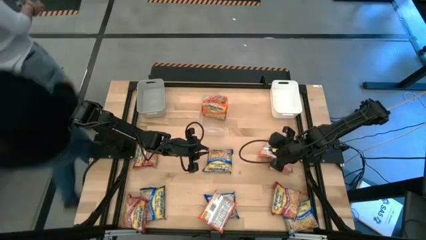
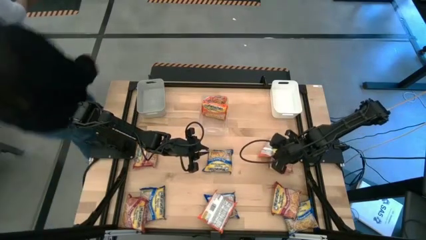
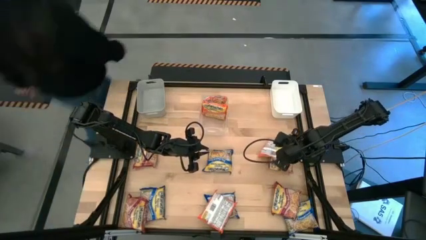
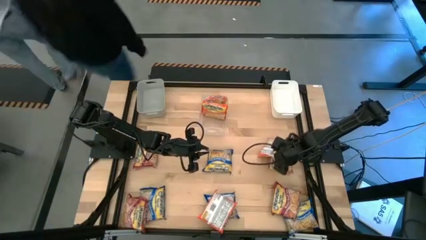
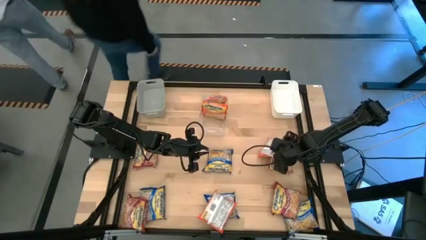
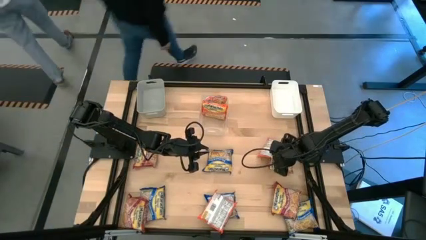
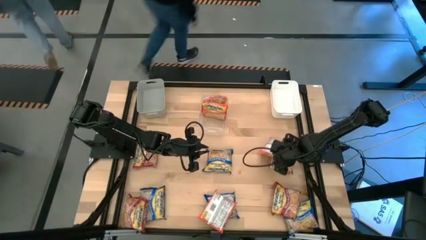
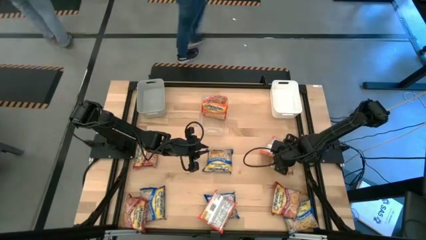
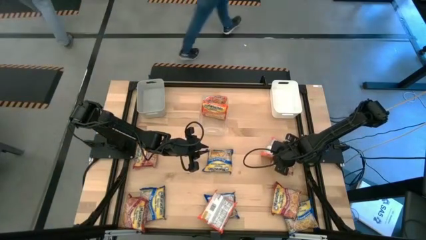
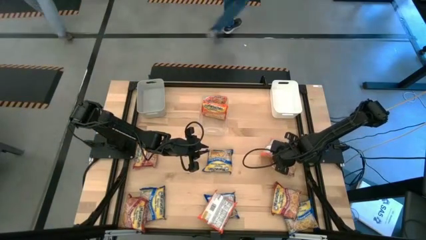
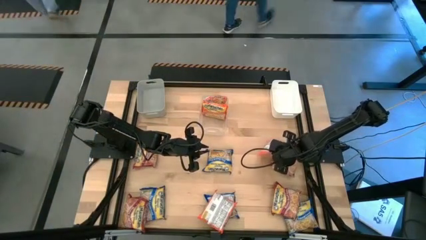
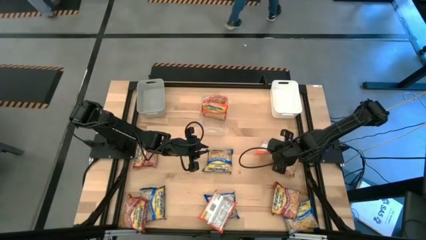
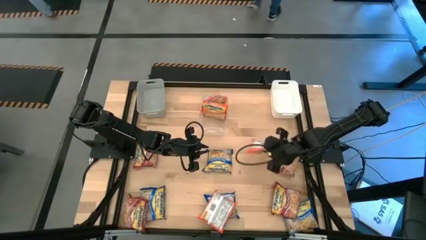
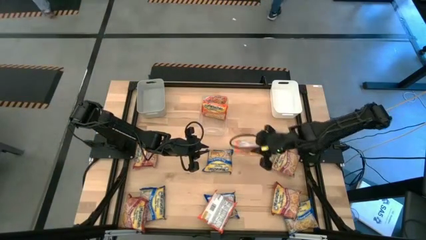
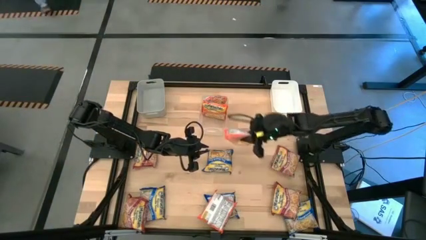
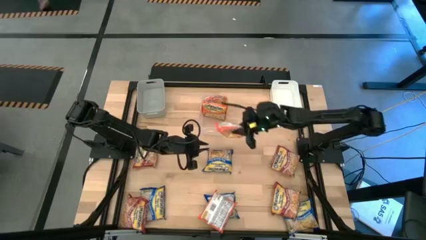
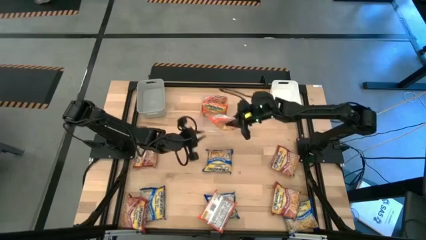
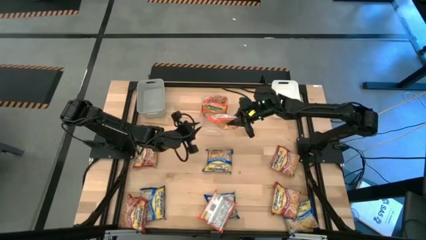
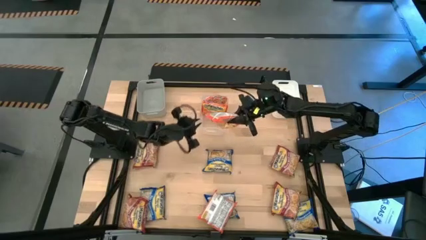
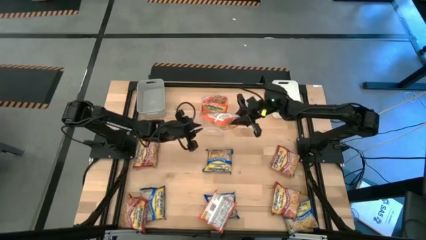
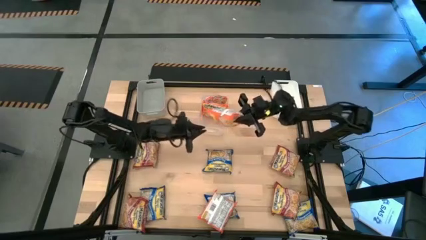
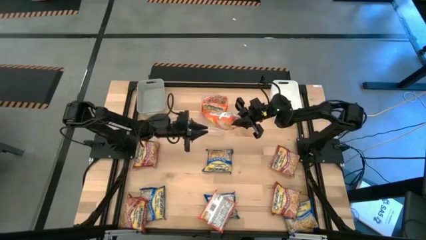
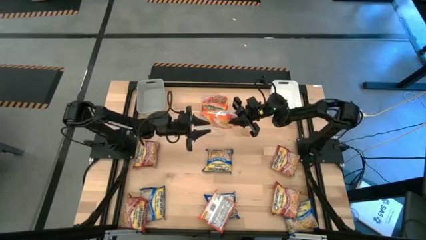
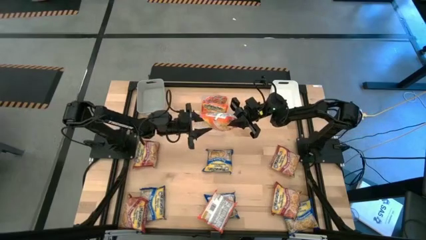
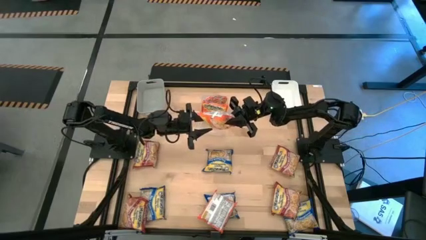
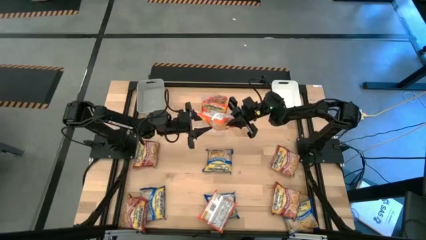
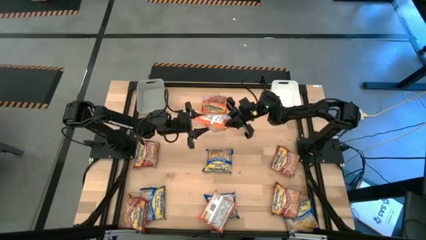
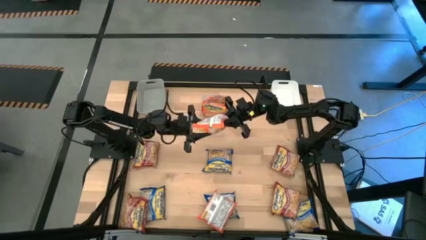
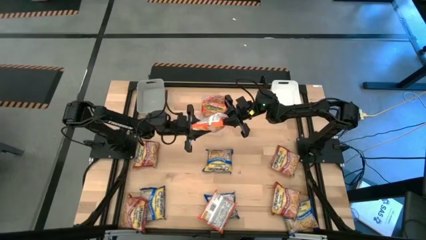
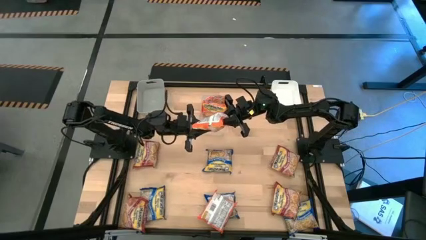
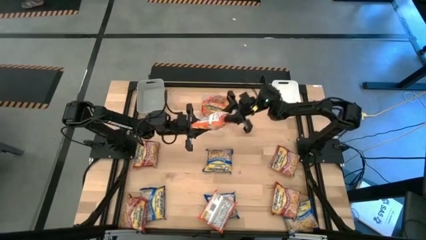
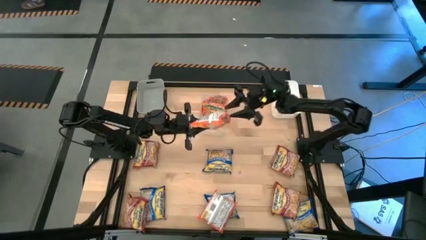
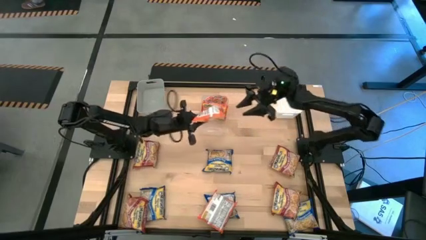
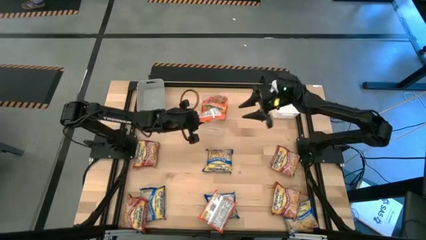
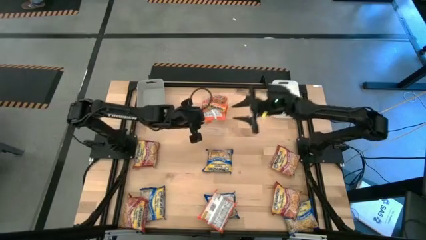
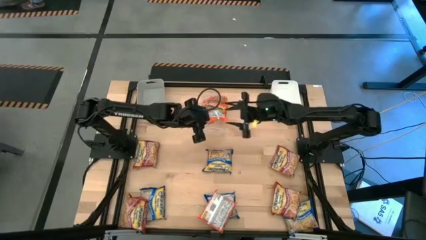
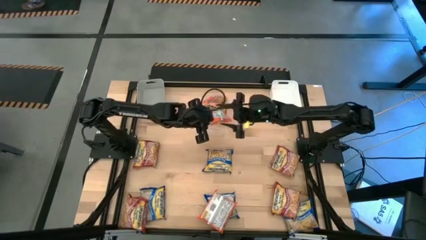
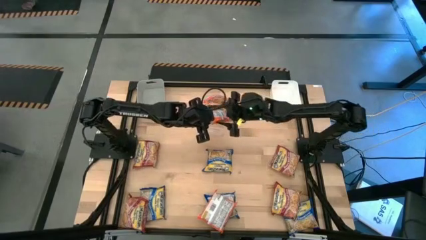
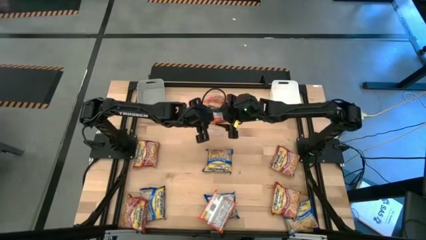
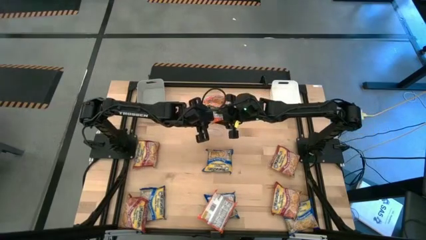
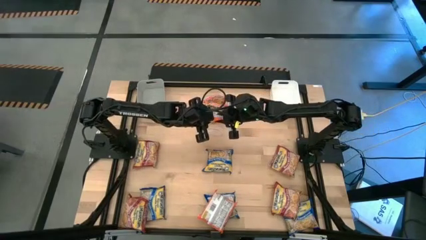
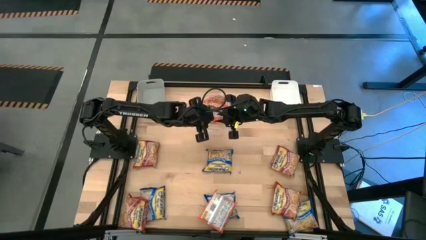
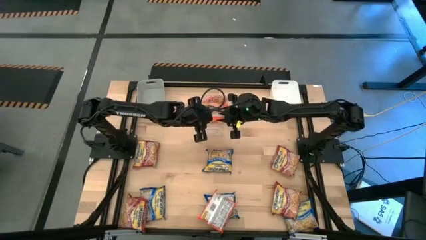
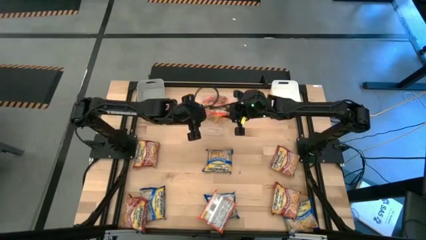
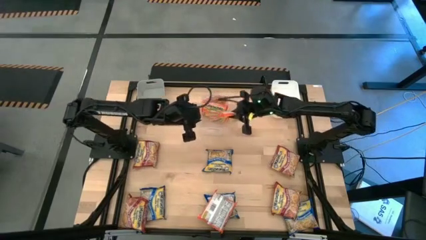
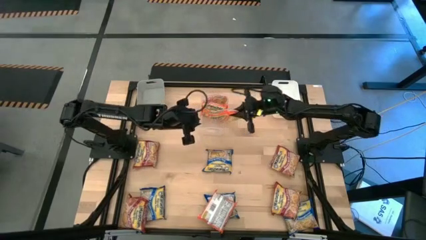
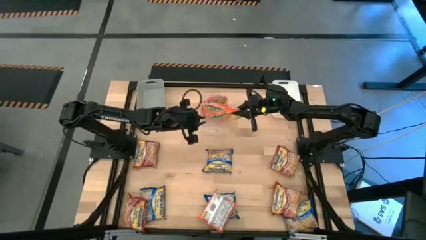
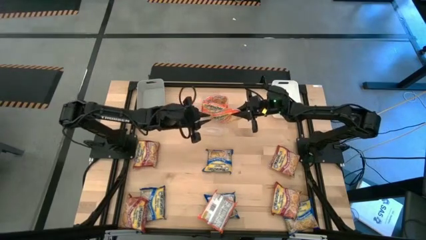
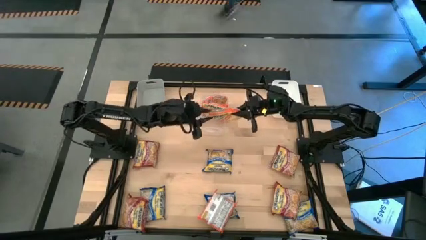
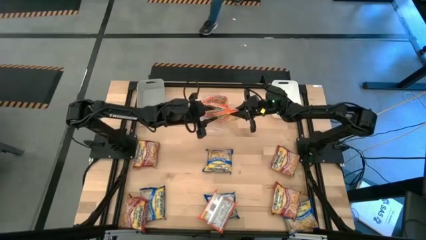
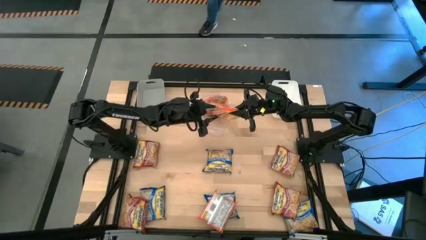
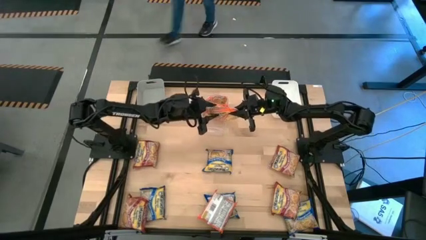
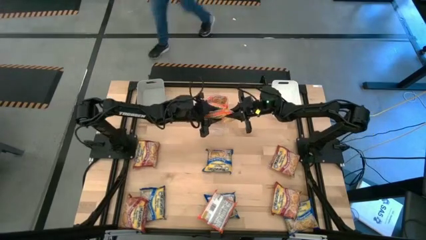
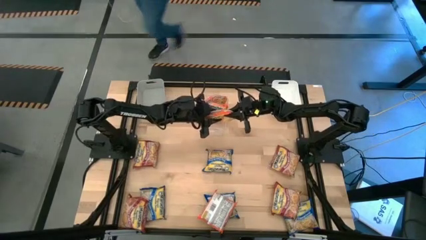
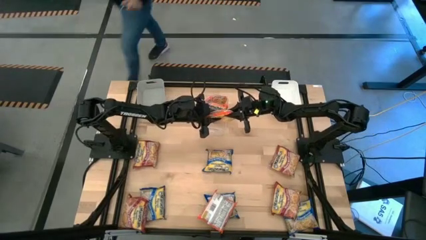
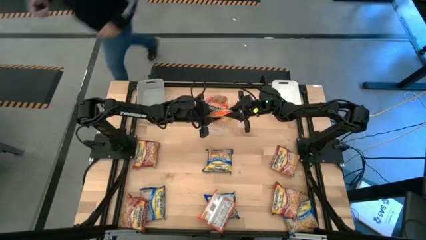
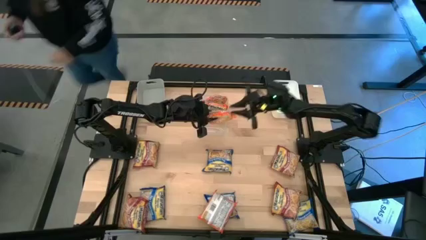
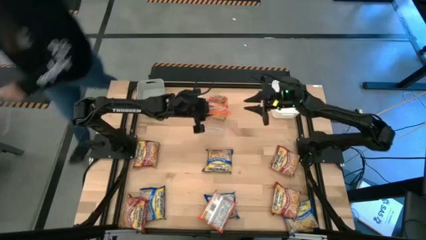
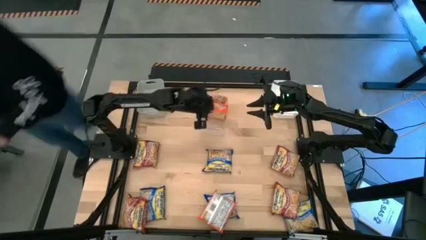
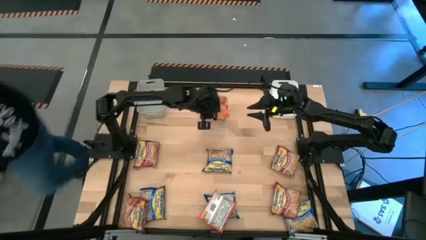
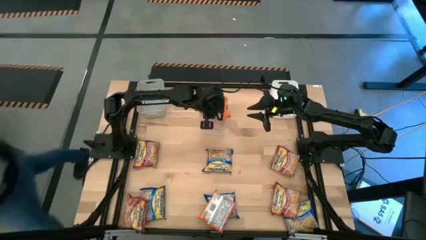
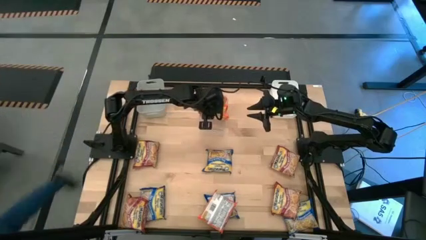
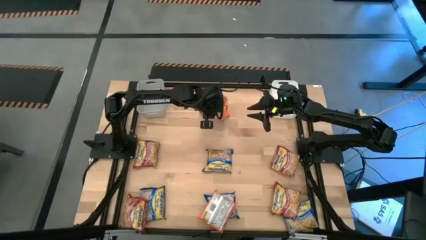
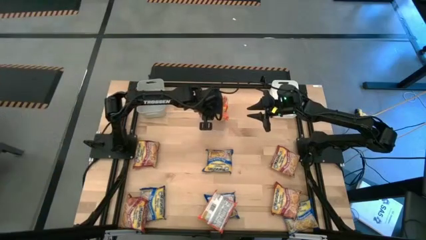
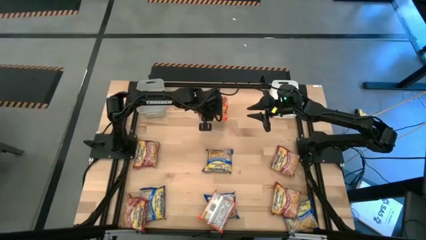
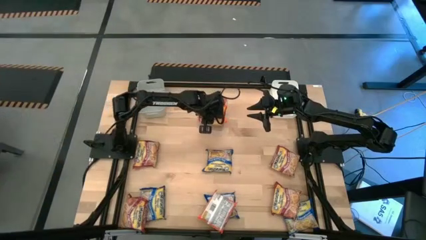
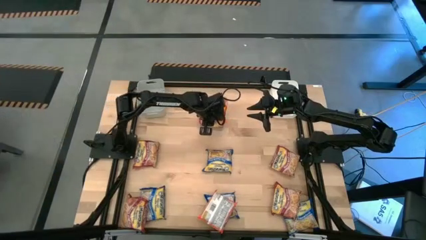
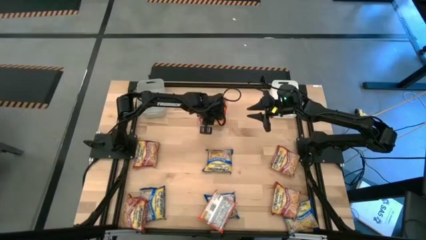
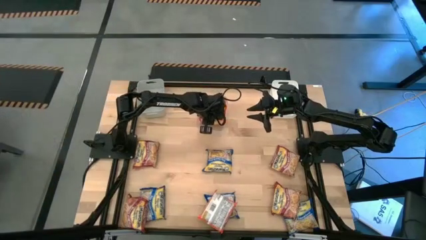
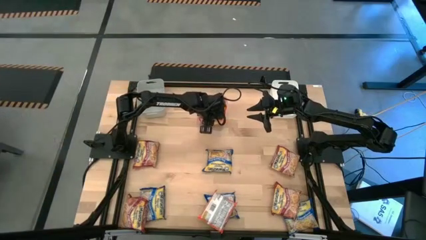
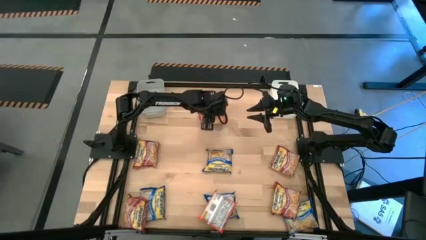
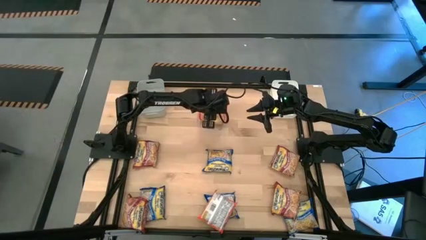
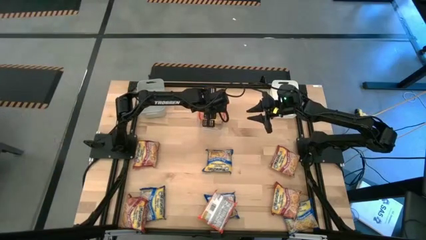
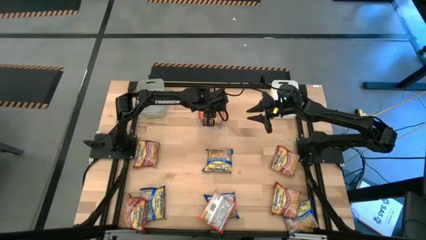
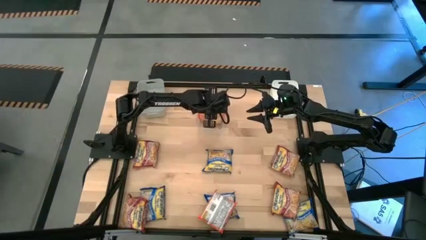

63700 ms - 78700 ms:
Task: Sort Maruchan noodles
Put the top orange noodle into the transparent bin

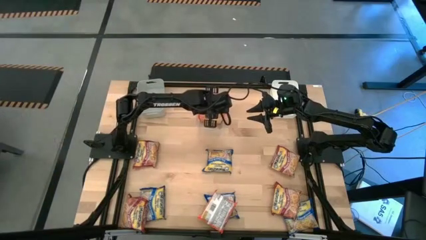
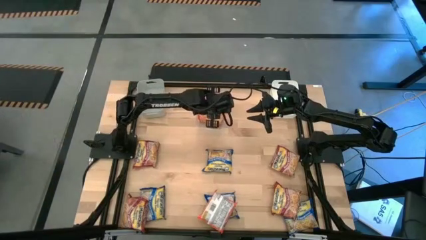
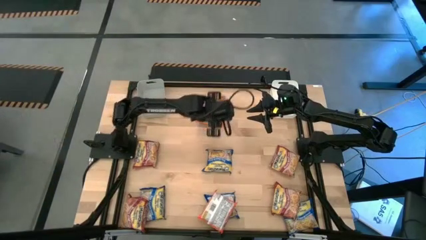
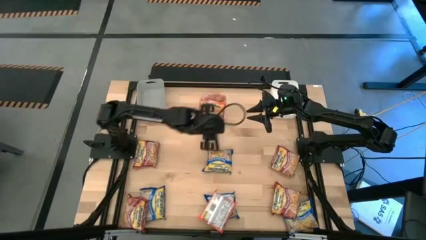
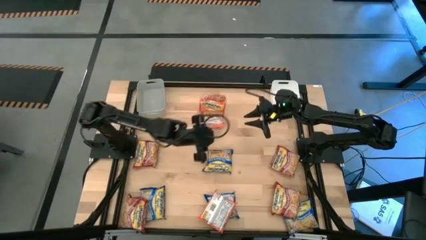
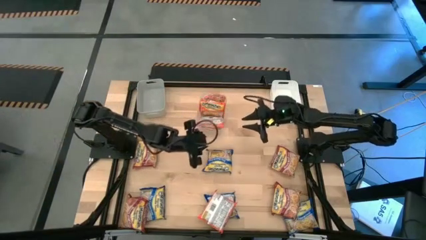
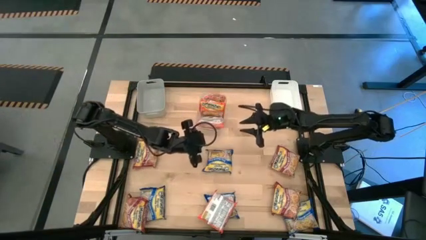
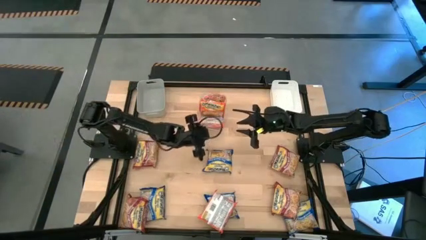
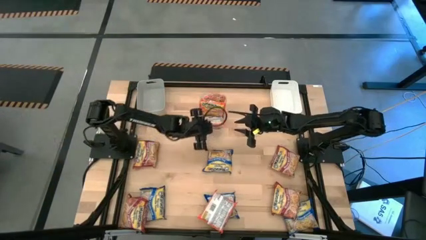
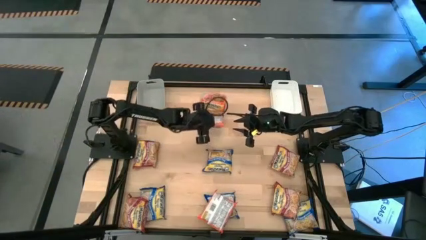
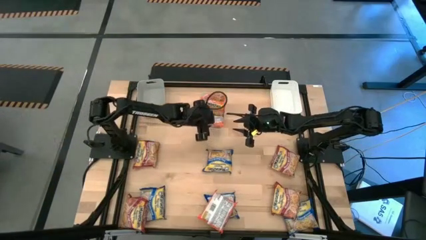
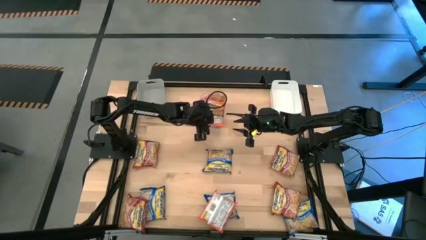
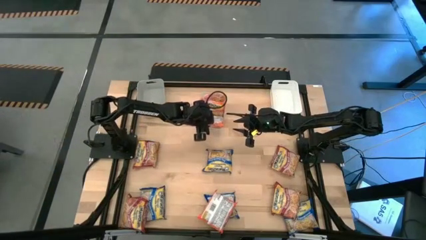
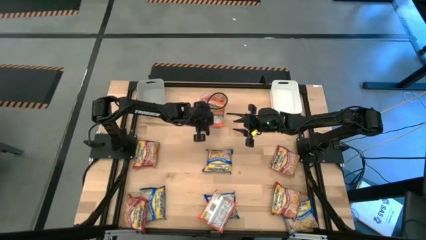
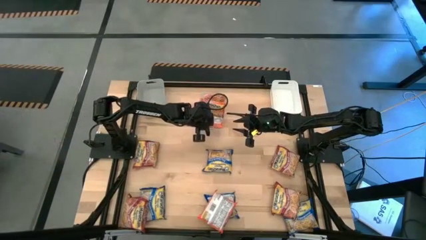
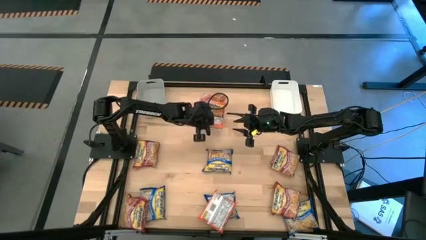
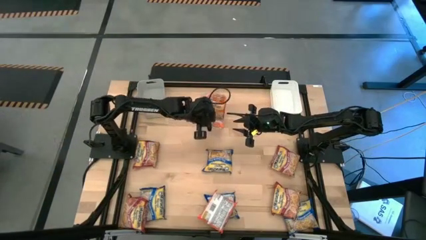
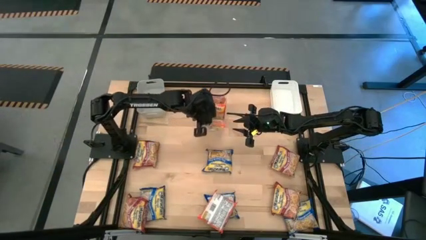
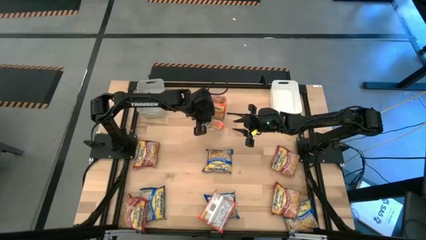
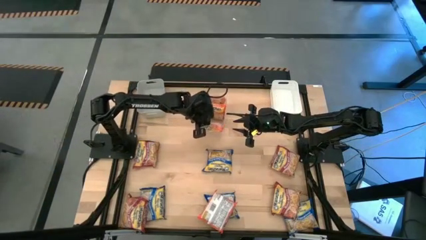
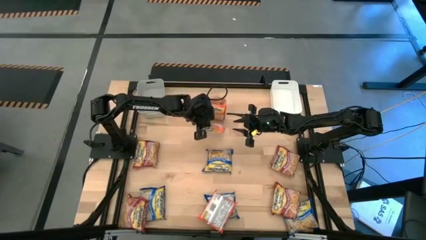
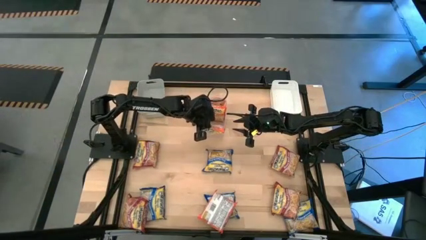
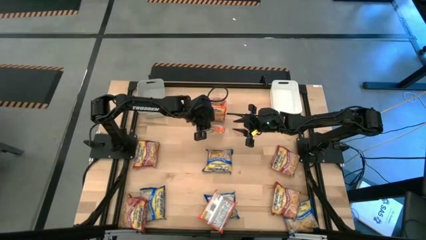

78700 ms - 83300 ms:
Adjust the orange noodle on the transparent bin
